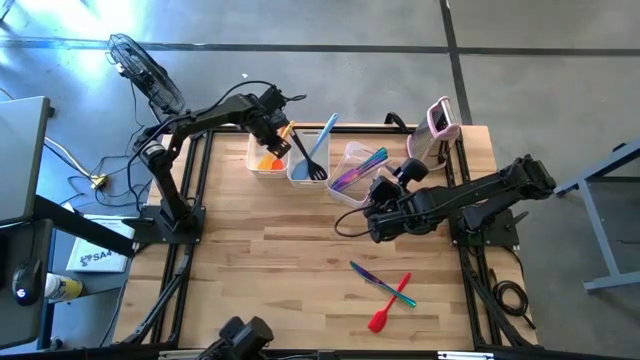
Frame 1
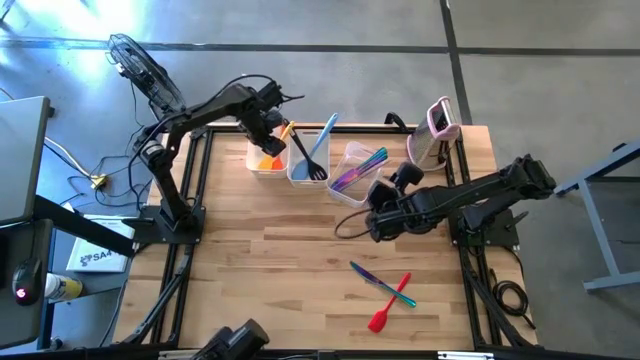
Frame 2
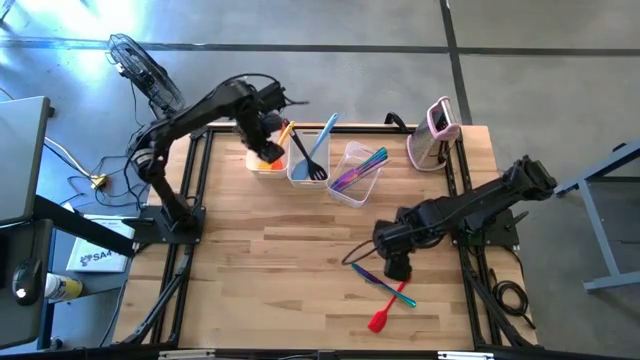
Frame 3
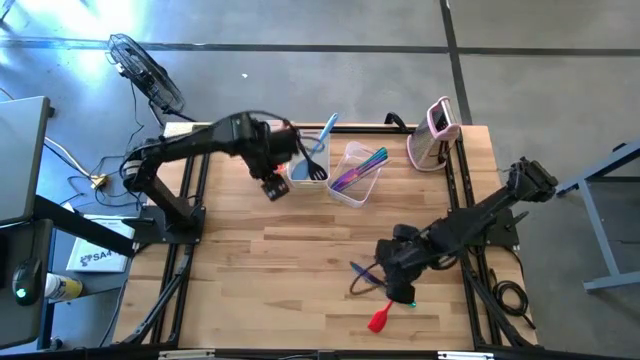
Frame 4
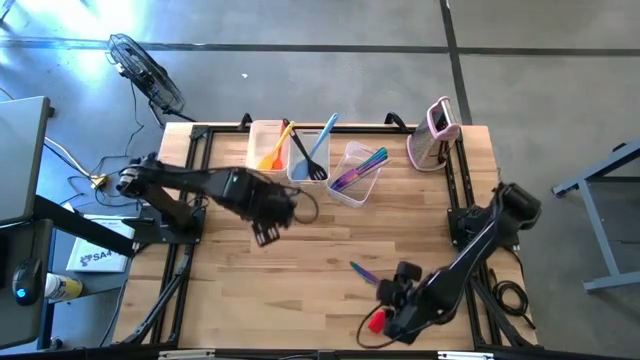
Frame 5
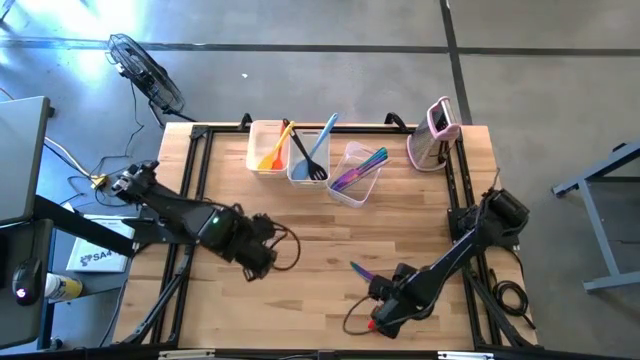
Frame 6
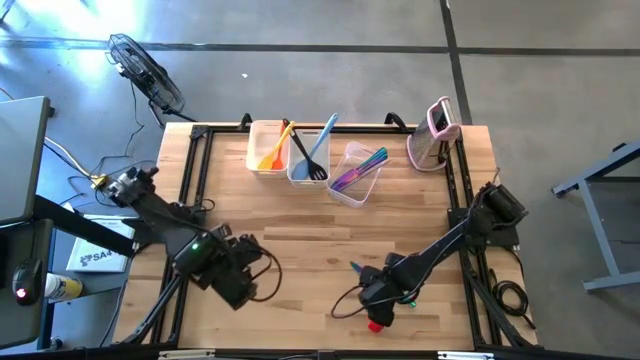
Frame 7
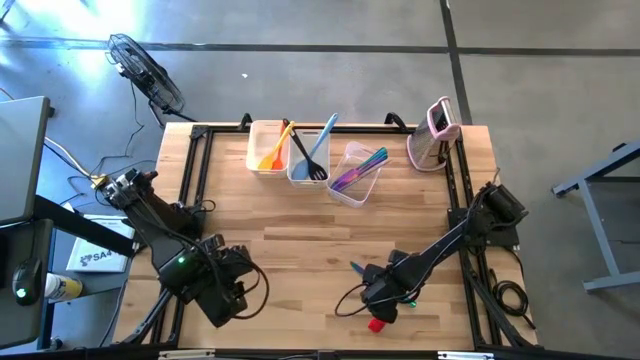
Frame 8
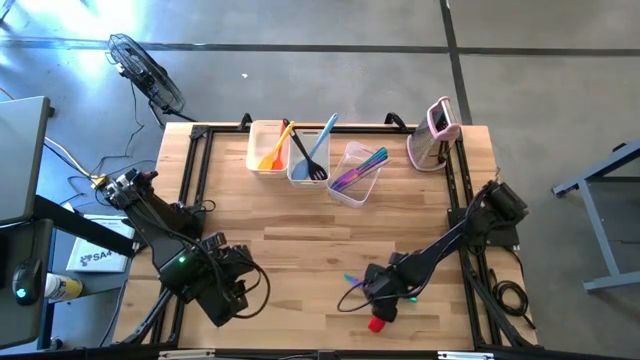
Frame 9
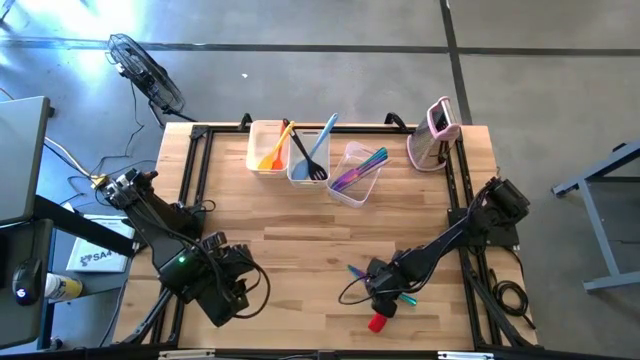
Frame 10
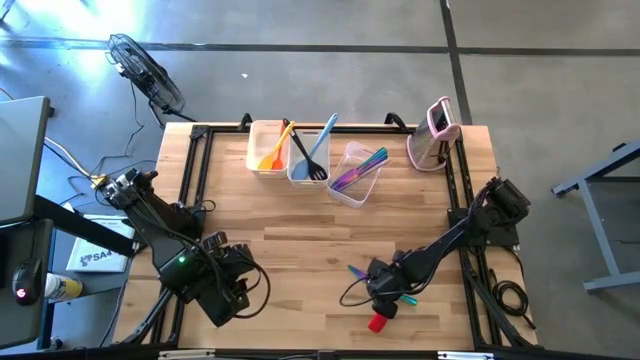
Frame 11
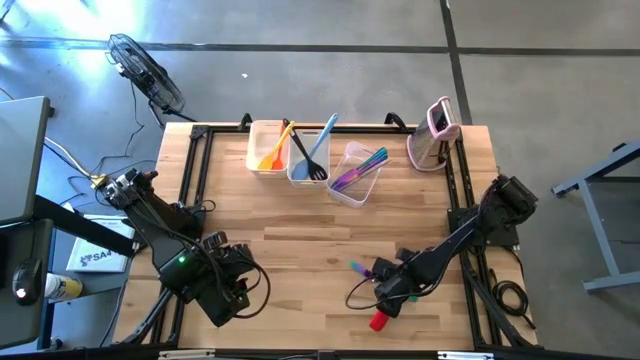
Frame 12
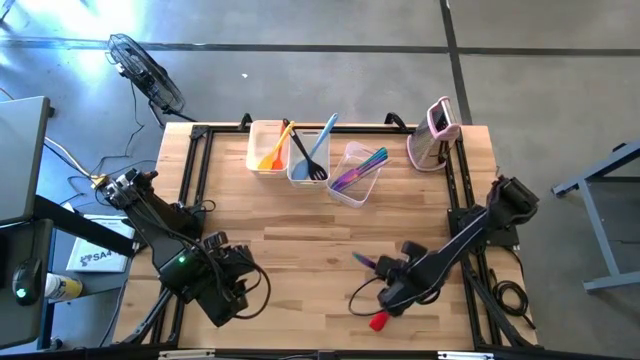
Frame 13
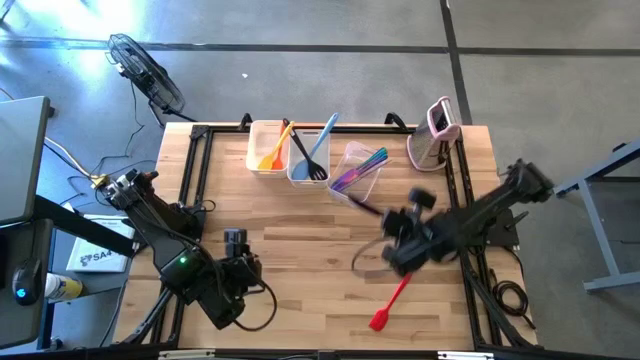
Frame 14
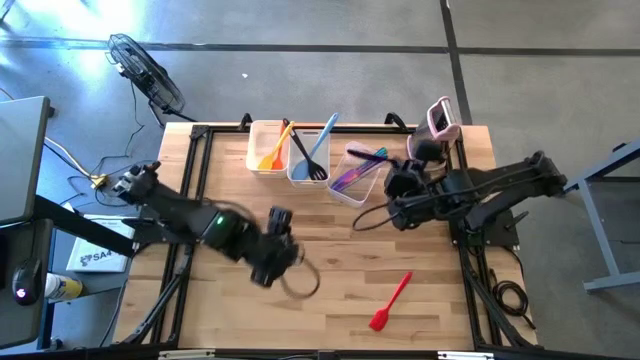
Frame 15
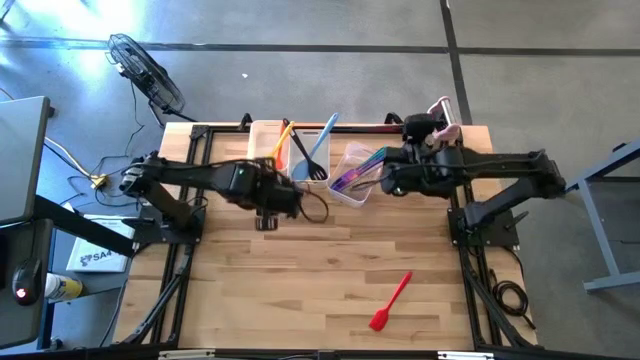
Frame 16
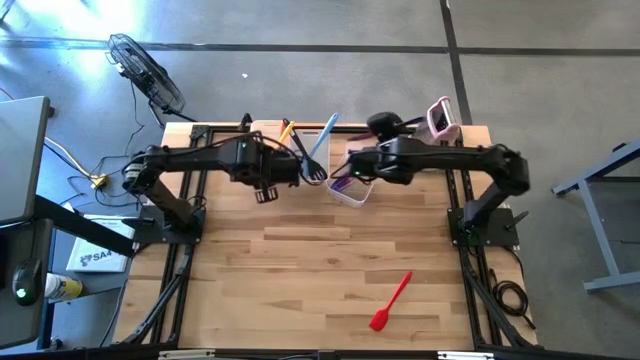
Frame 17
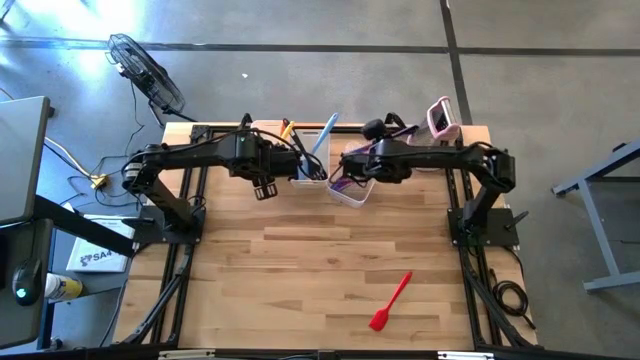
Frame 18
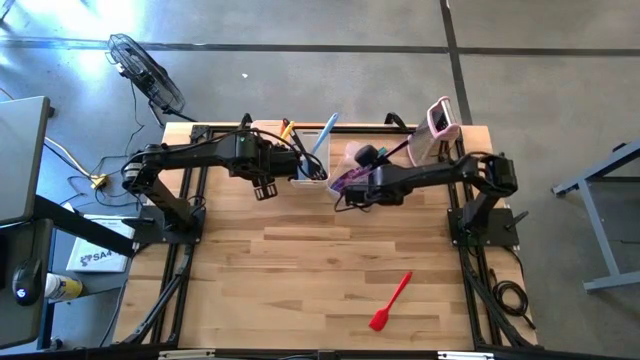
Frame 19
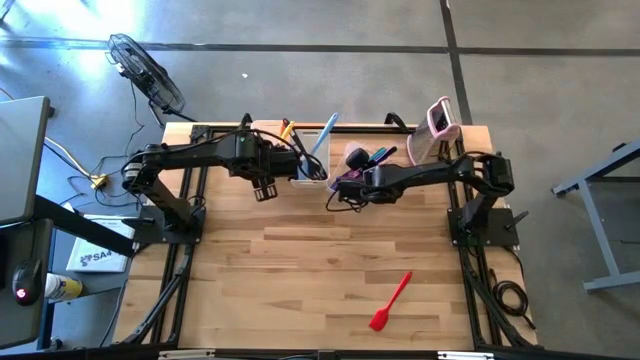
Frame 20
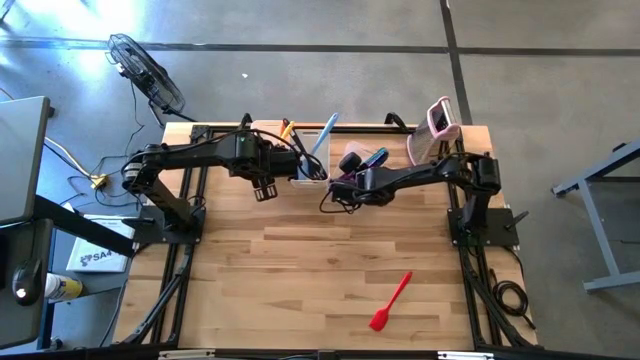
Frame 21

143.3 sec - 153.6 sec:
Task: Pick & Place Kitchen Items
Put the purple table knife into the transparent bin

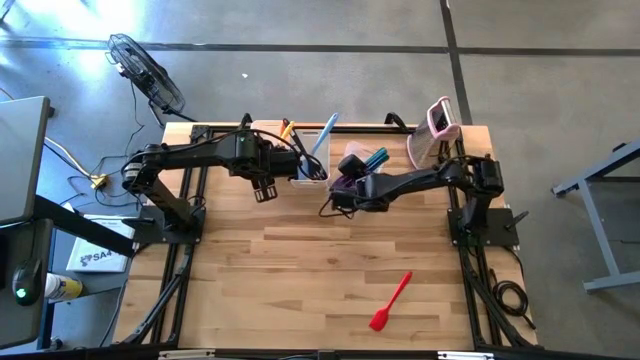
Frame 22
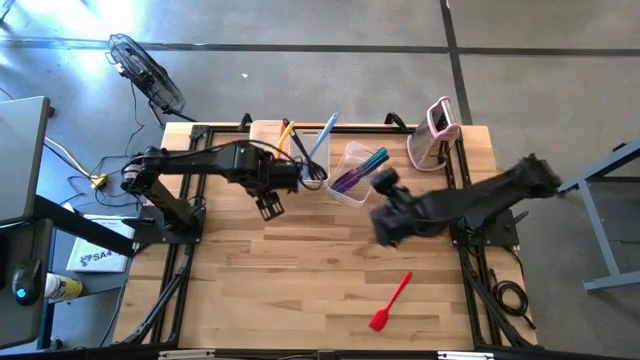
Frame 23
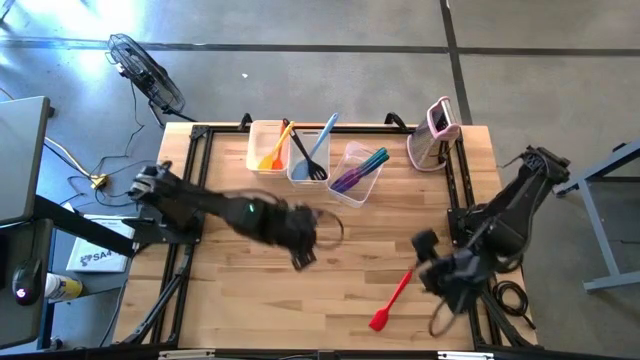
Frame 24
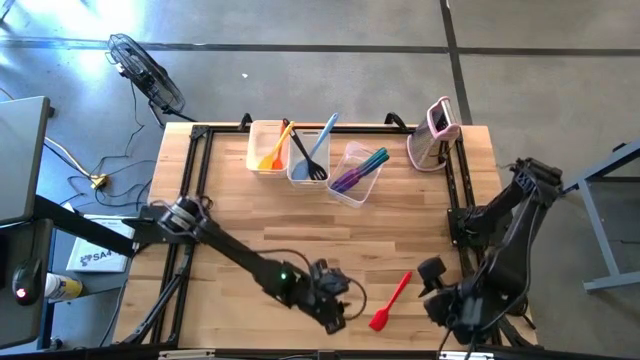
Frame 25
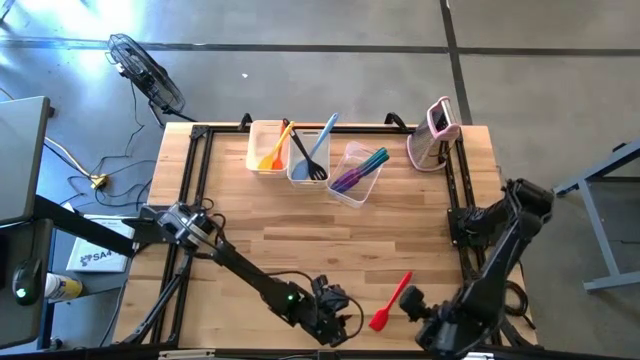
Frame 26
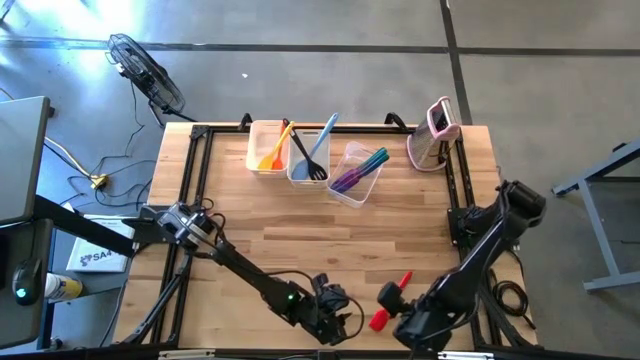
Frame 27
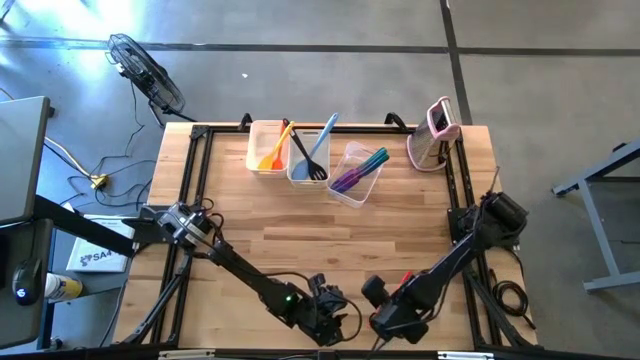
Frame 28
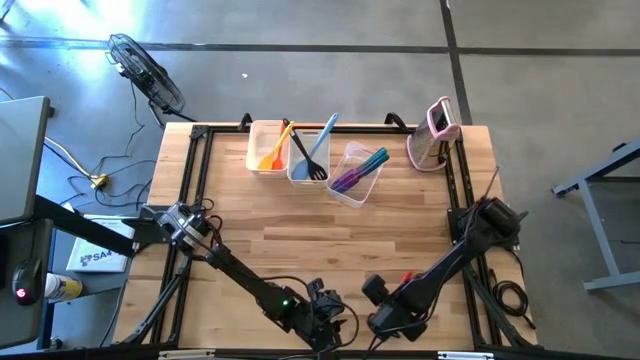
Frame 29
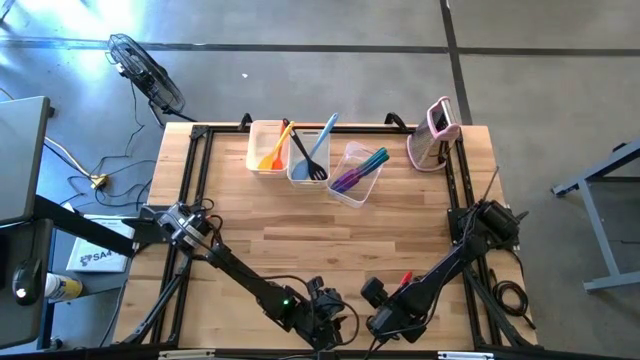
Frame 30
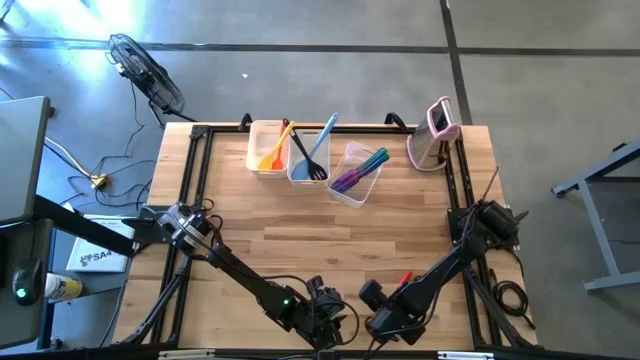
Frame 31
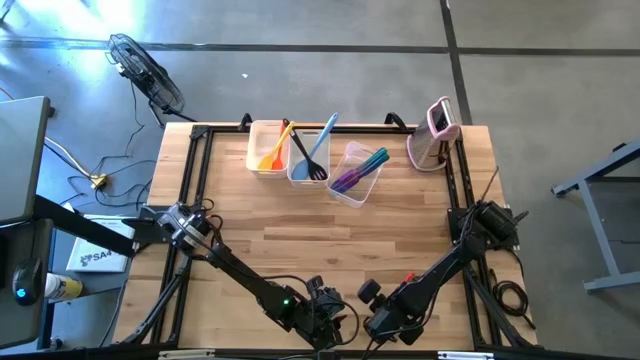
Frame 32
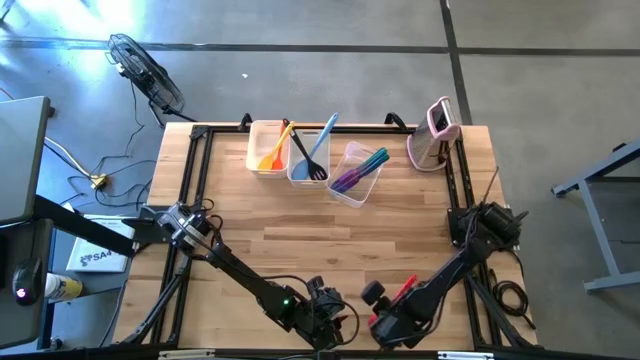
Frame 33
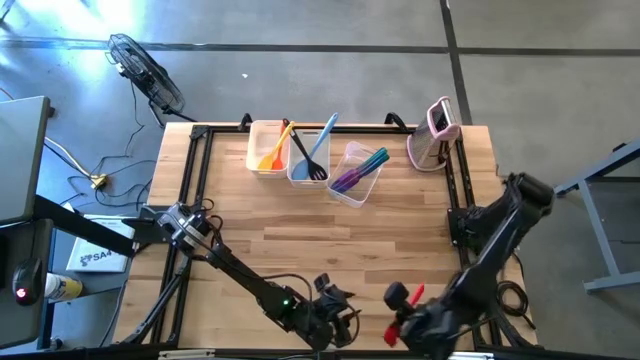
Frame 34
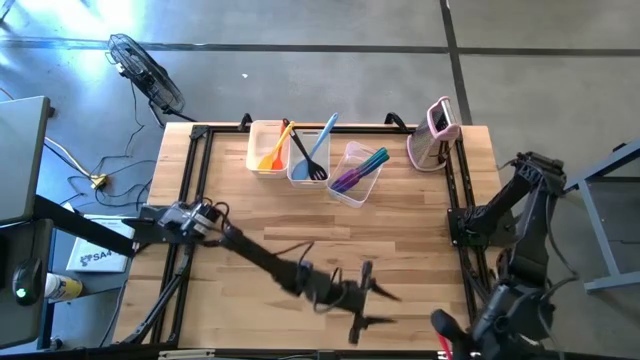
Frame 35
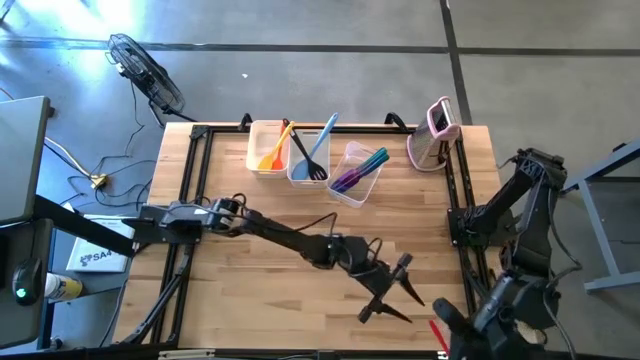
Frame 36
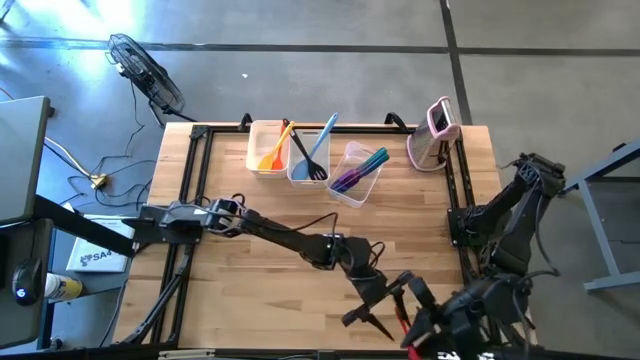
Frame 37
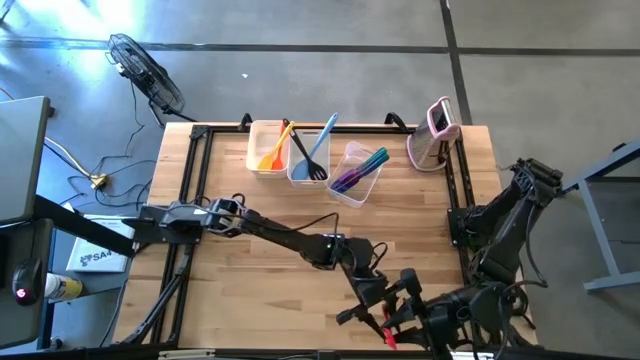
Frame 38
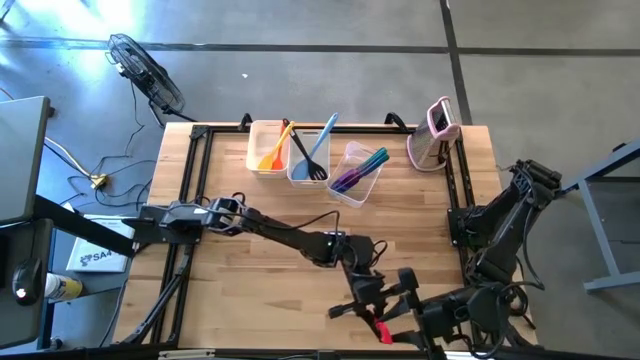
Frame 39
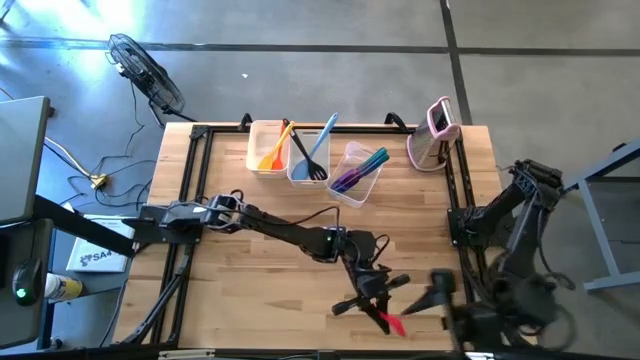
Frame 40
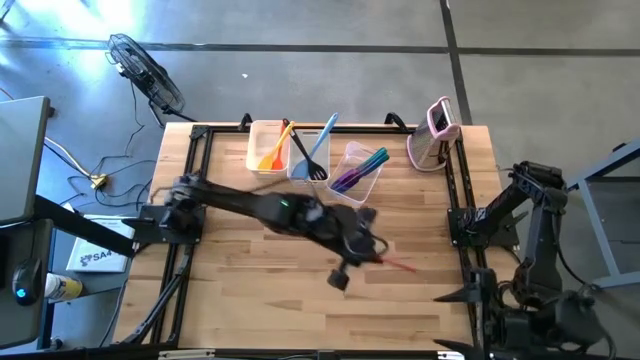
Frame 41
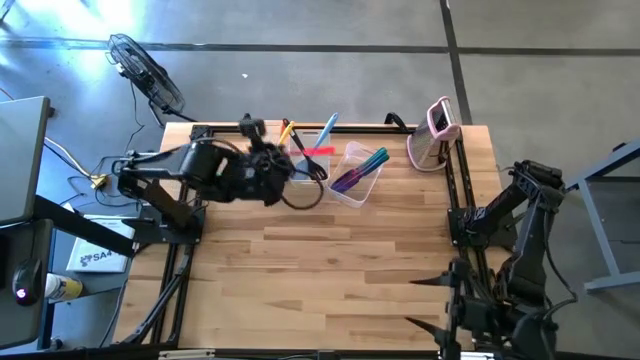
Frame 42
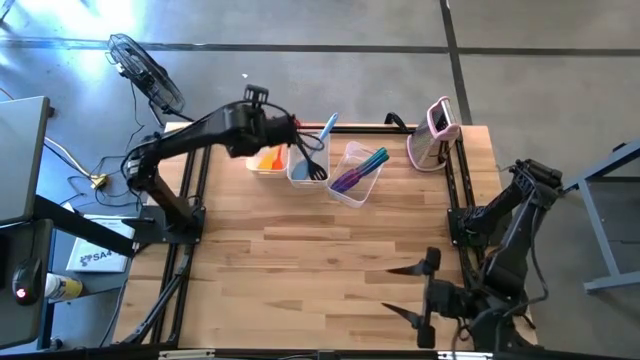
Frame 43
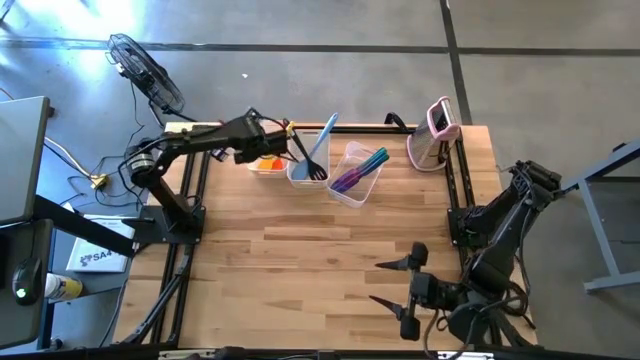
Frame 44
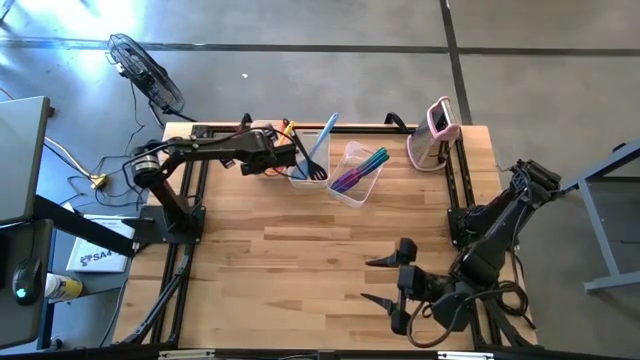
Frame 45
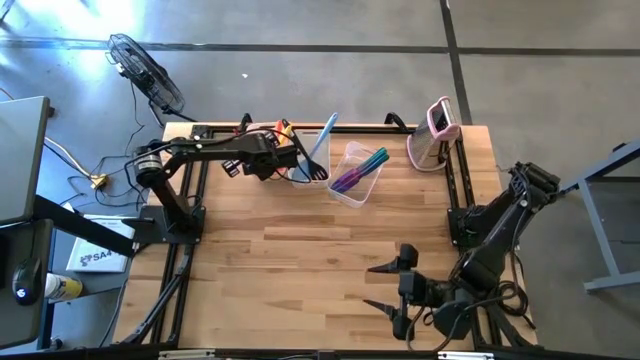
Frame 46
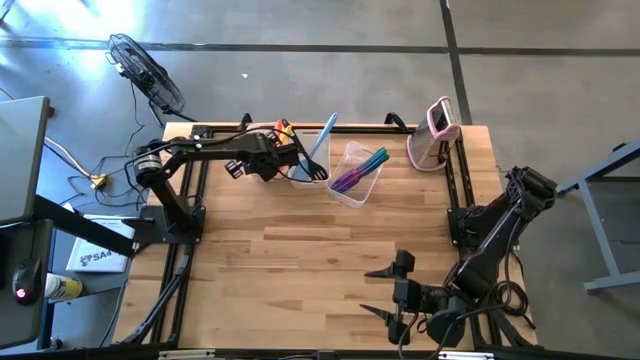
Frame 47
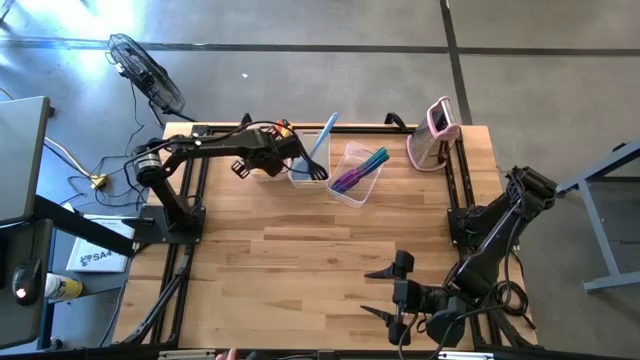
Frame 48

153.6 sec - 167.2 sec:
Put the red spatula into the left white bin
